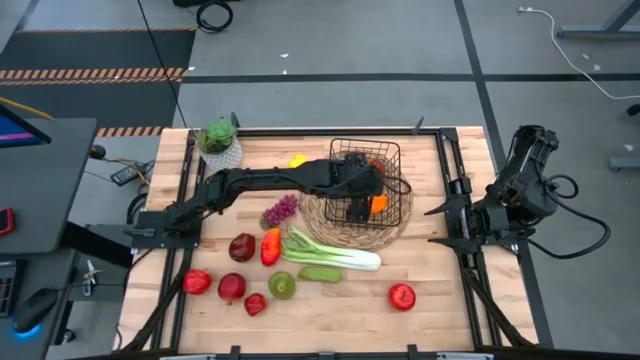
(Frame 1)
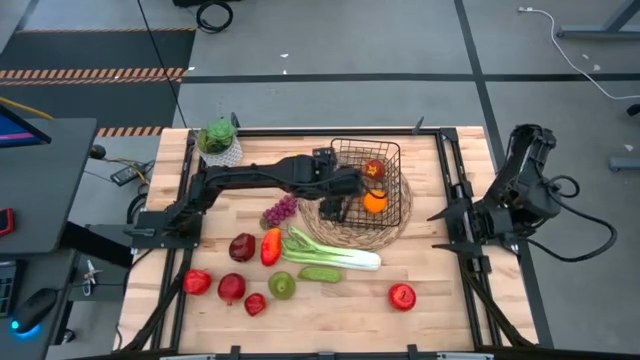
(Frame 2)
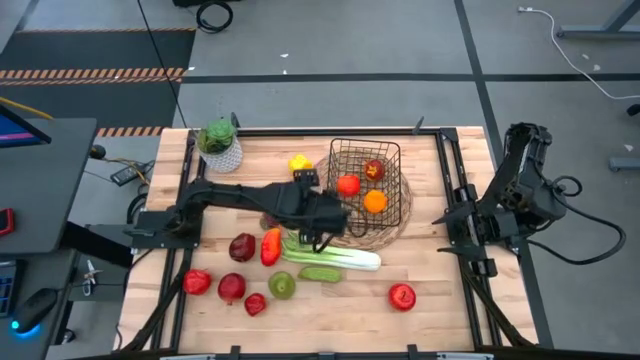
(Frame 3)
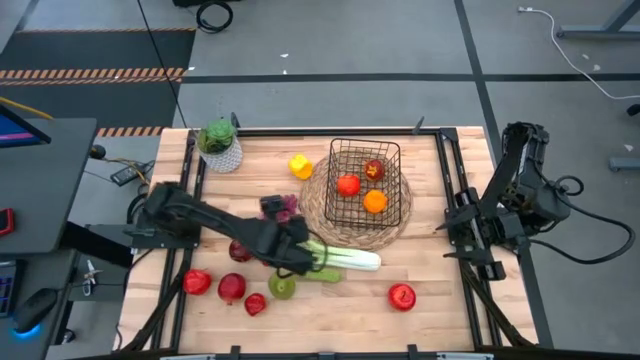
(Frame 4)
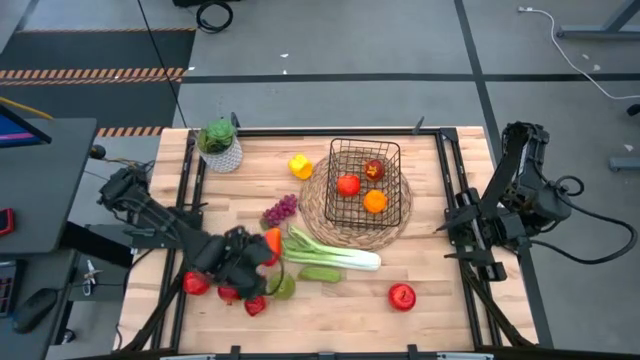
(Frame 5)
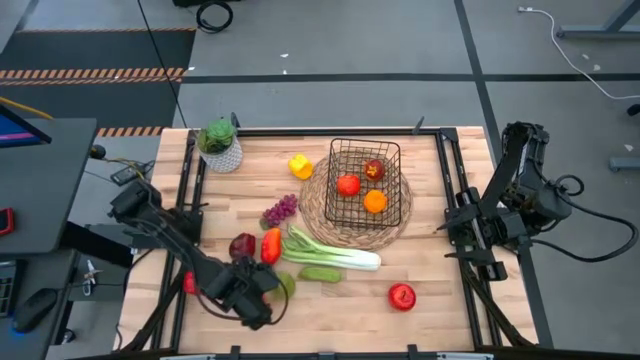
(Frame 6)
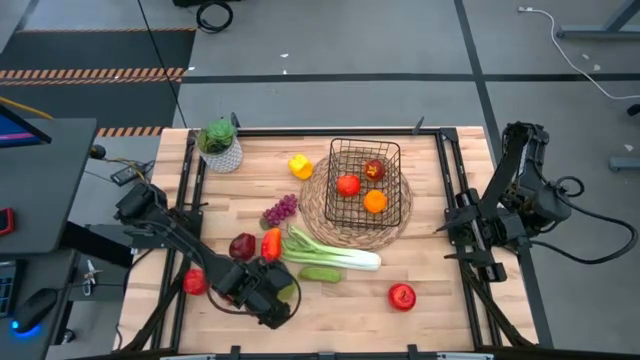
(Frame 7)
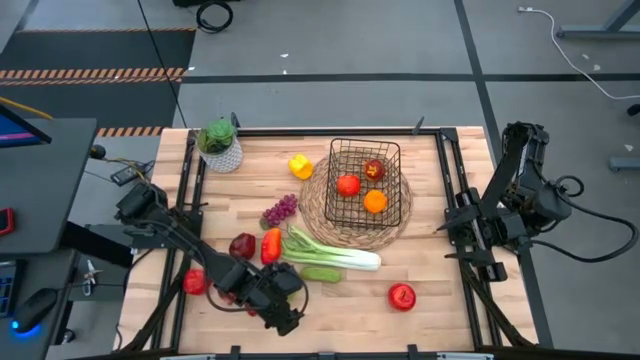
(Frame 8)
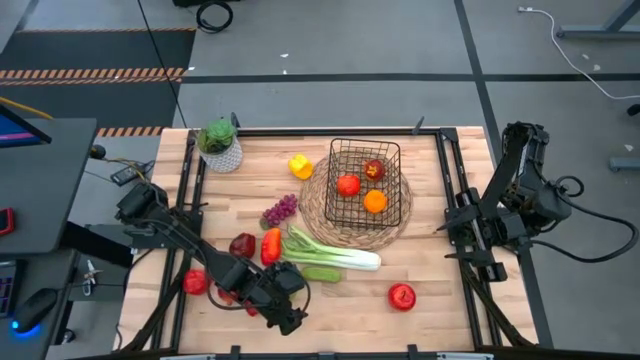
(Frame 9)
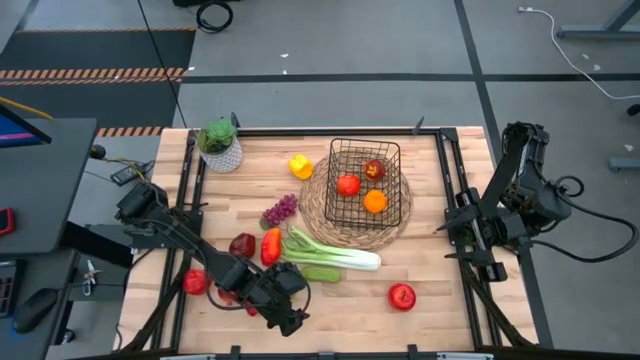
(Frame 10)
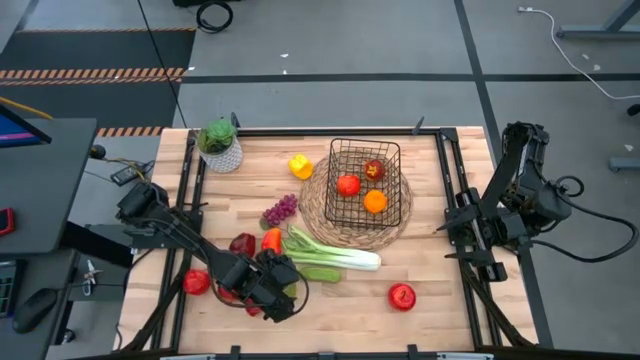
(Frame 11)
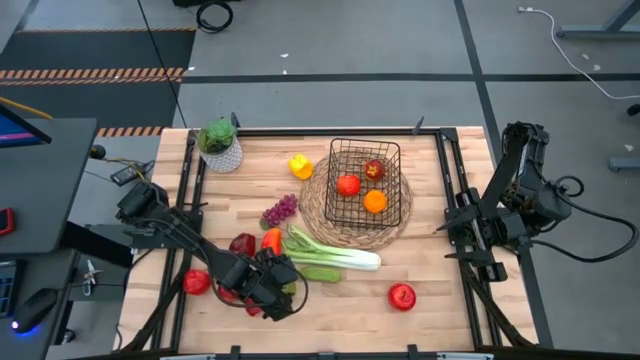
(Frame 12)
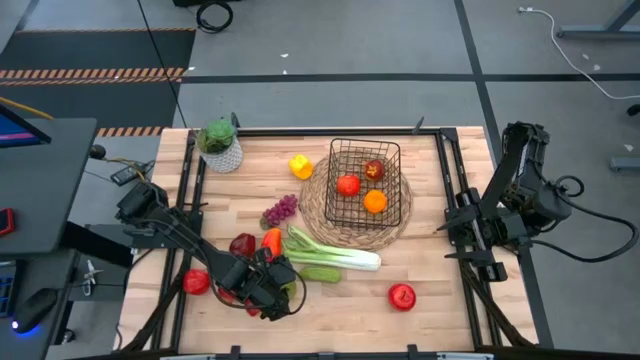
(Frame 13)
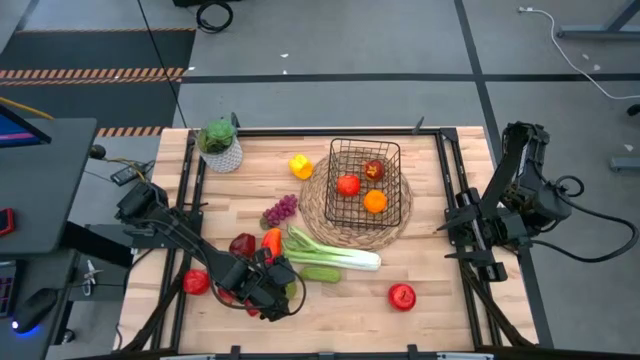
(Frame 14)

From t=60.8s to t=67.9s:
Task: Build produce basket
Put the pear into the wire basket

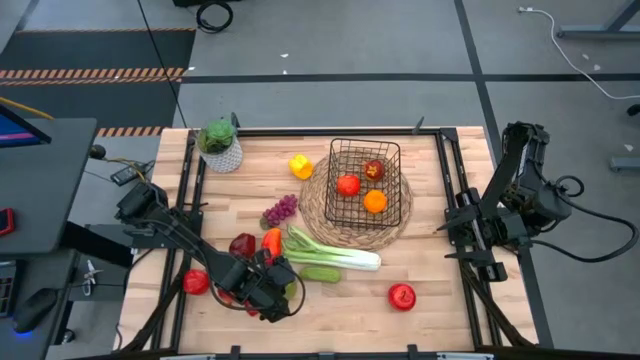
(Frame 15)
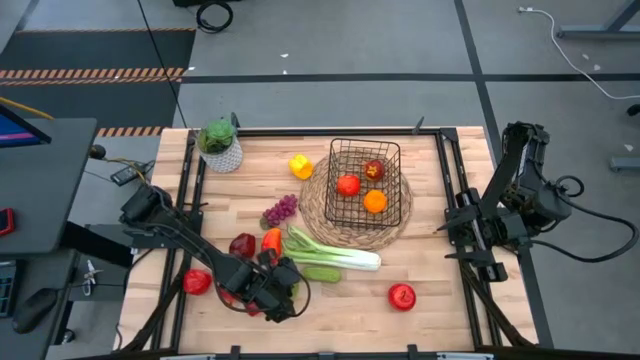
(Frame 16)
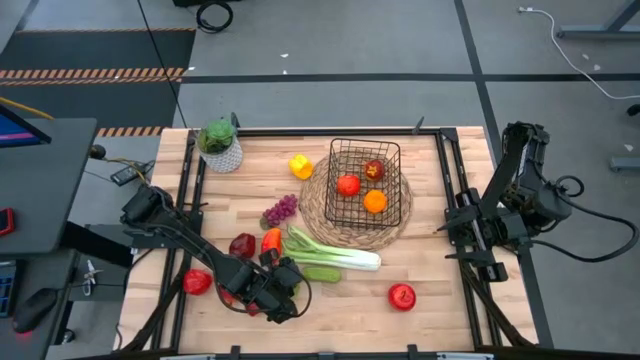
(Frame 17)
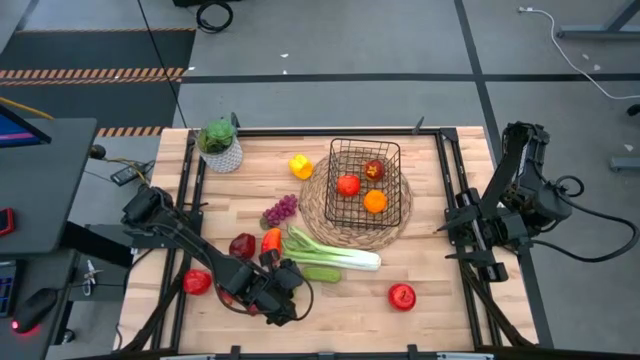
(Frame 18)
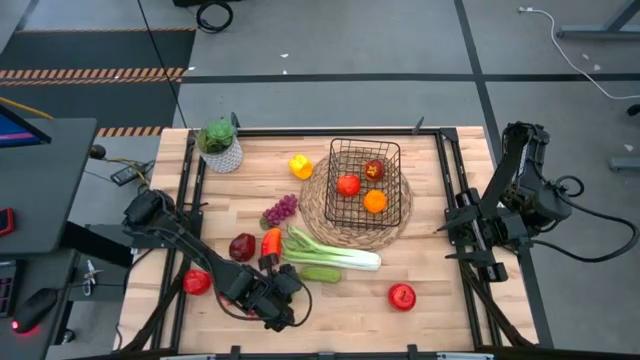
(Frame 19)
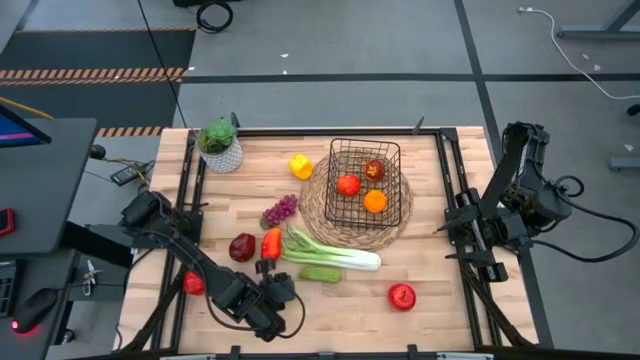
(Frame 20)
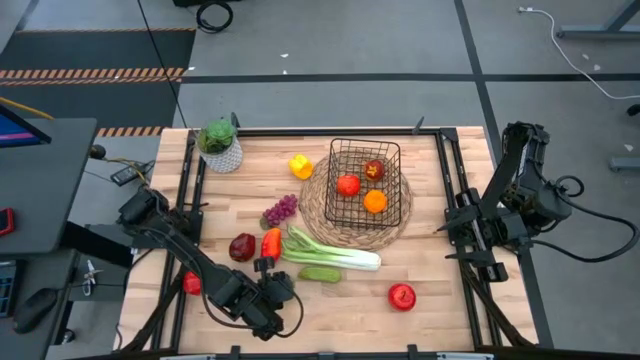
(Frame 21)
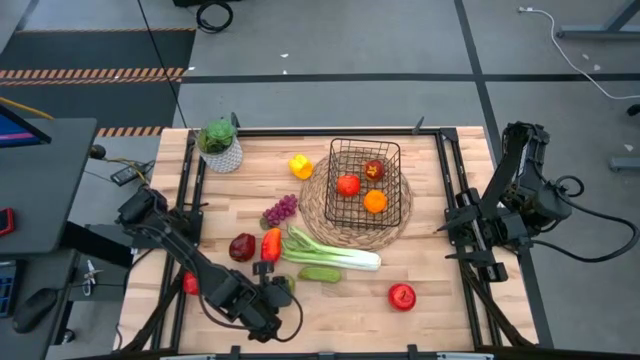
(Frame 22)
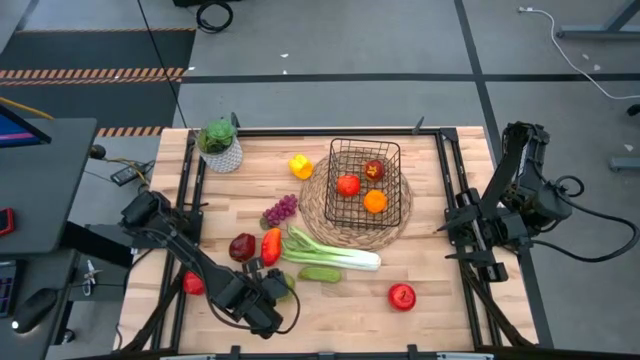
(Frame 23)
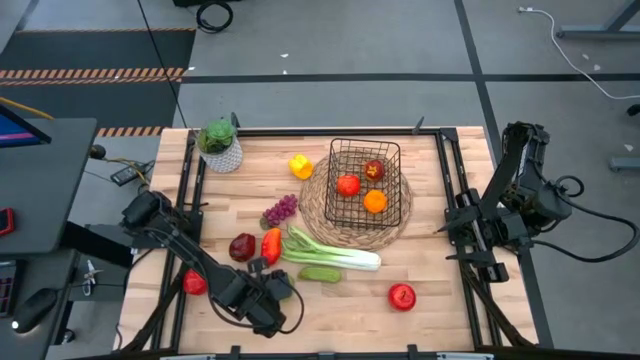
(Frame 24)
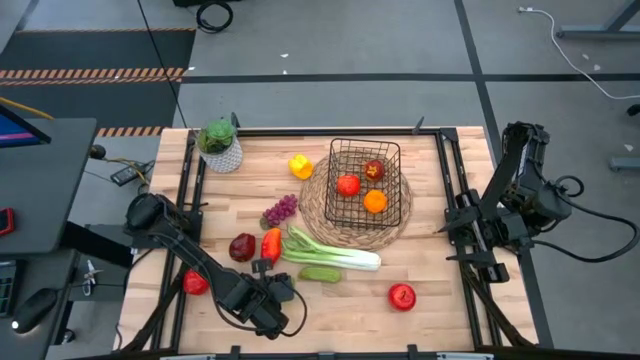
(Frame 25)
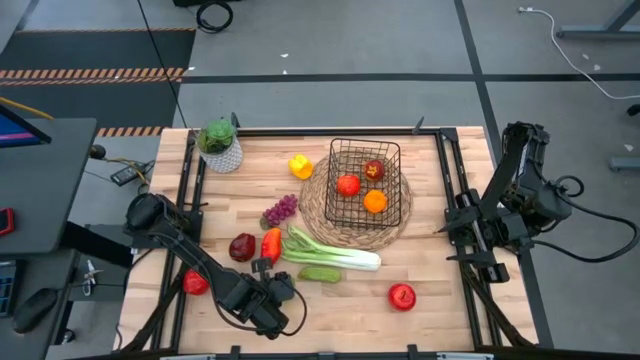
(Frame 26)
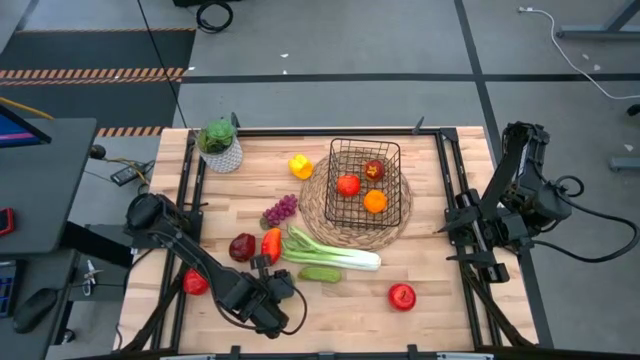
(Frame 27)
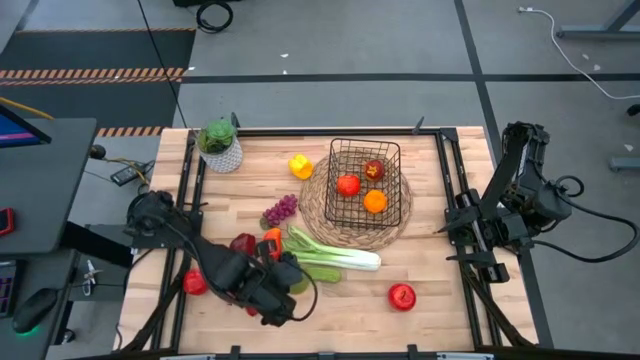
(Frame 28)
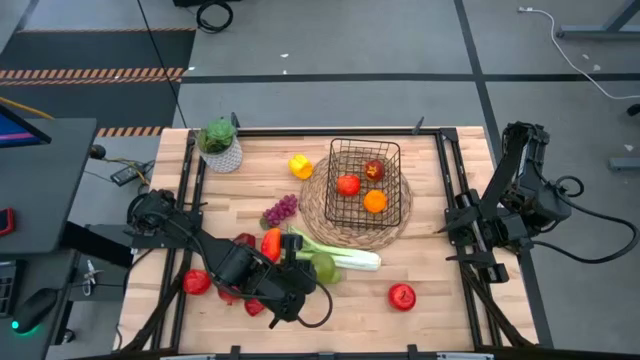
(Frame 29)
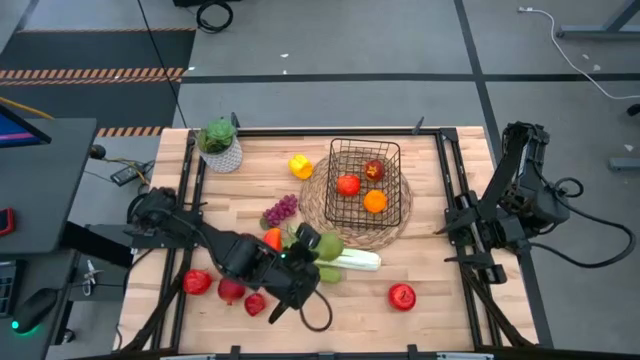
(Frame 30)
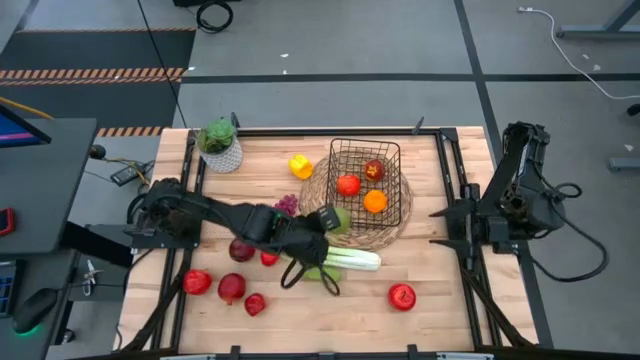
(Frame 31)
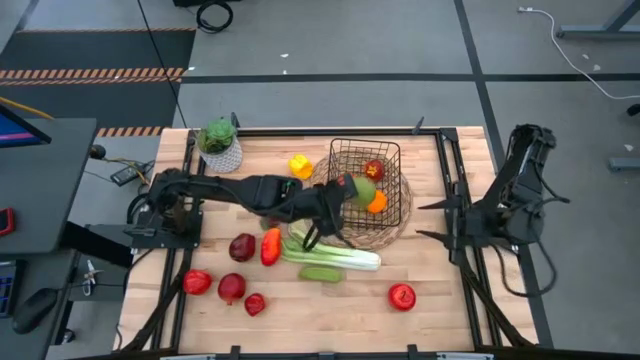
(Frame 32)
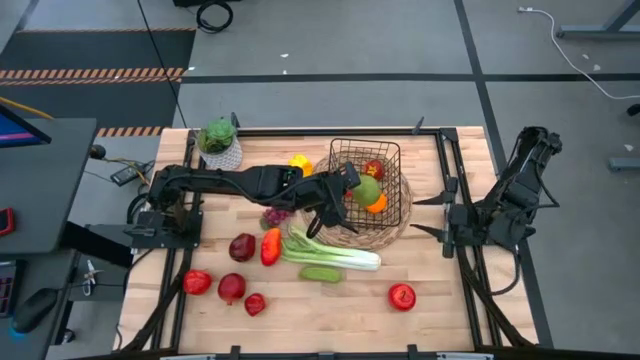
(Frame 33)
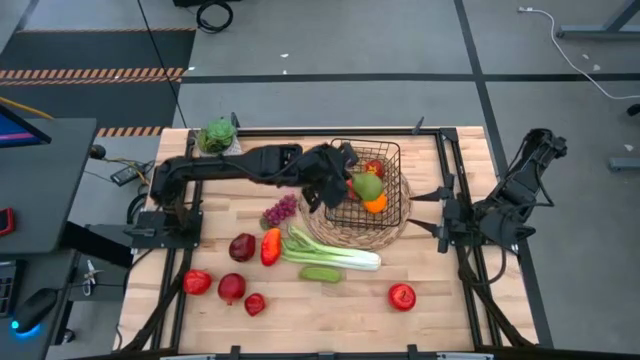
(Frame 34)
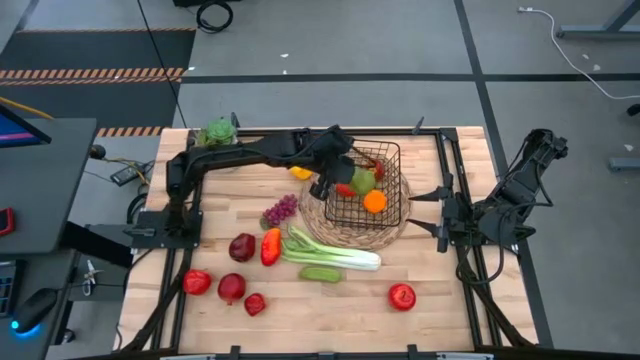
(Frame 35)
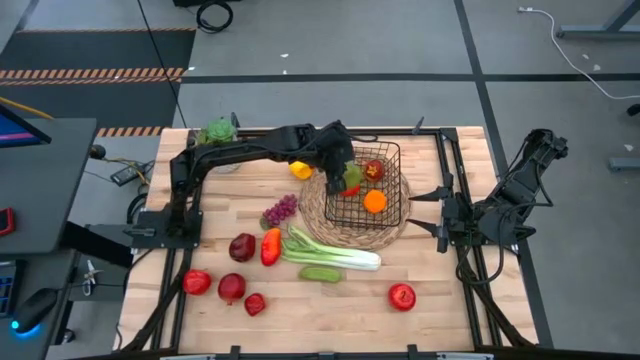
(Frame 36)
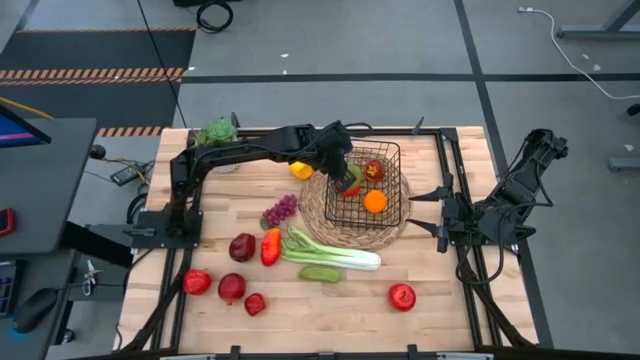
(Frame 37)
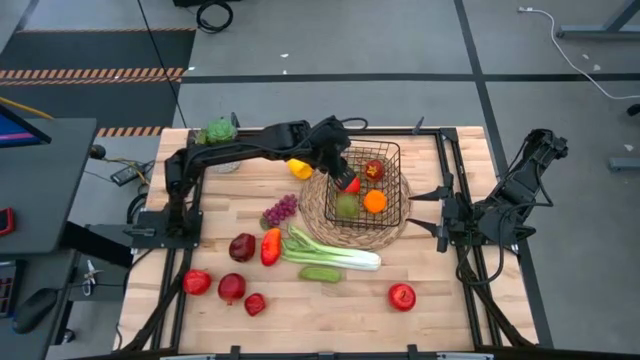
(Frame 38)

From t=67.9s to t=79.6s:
Put the pear into the wire basket
